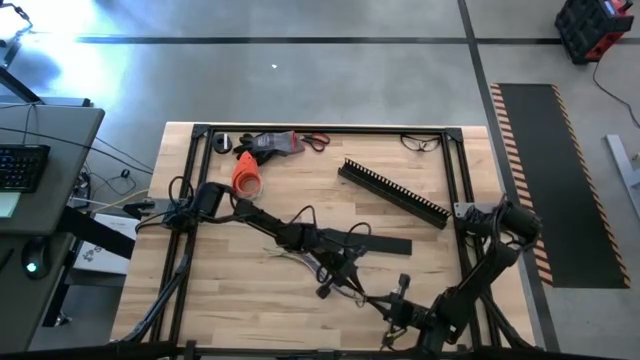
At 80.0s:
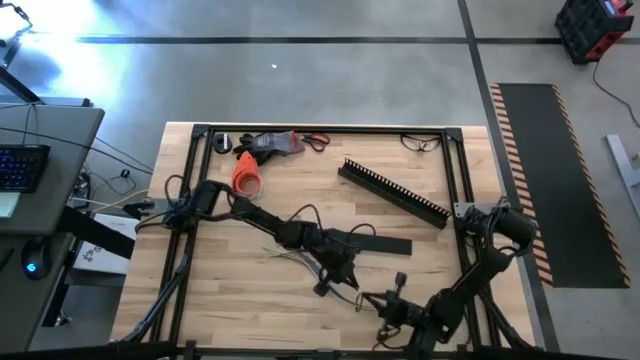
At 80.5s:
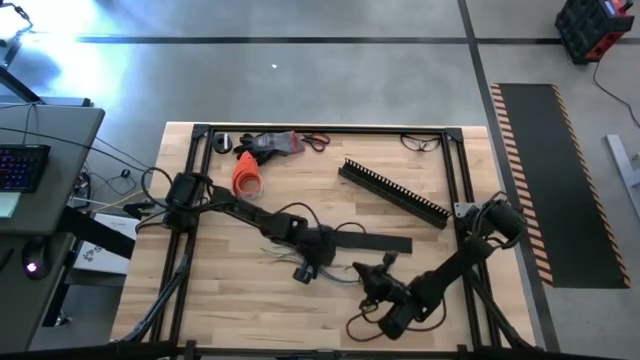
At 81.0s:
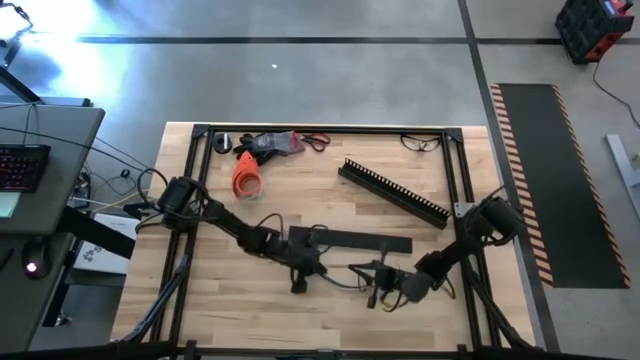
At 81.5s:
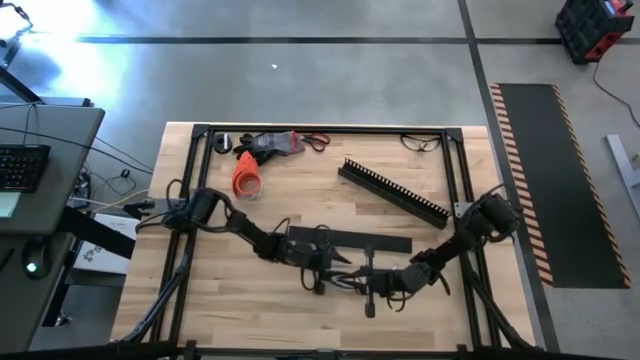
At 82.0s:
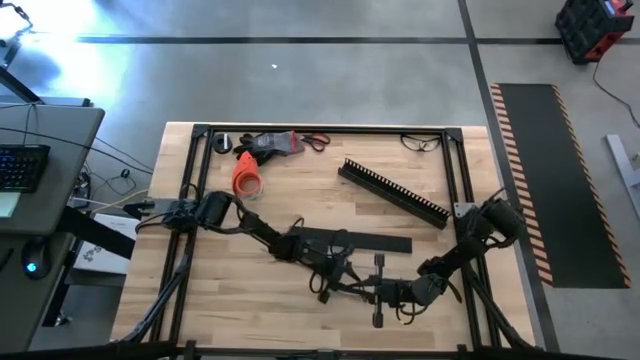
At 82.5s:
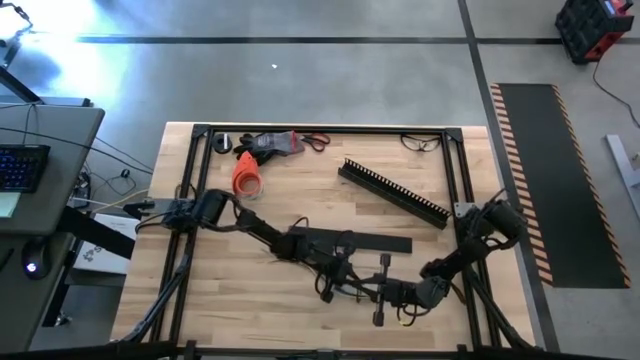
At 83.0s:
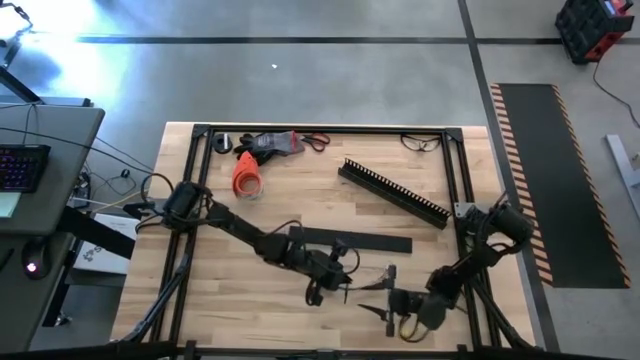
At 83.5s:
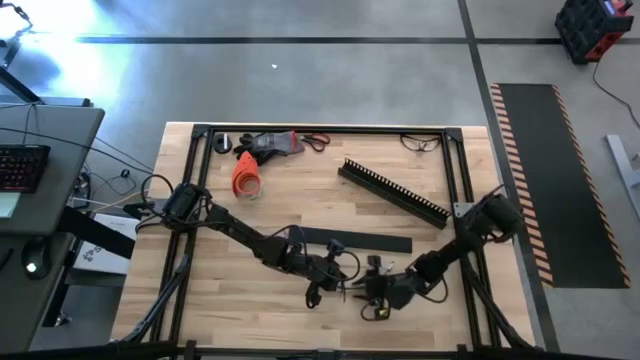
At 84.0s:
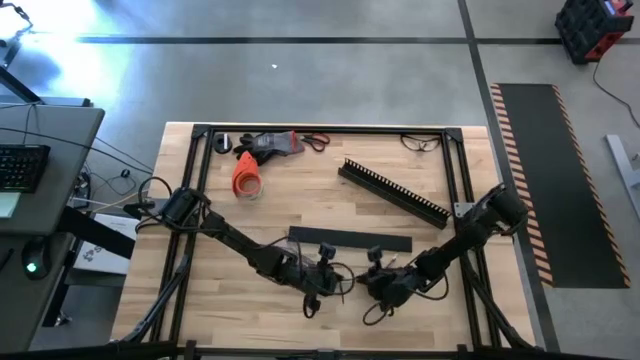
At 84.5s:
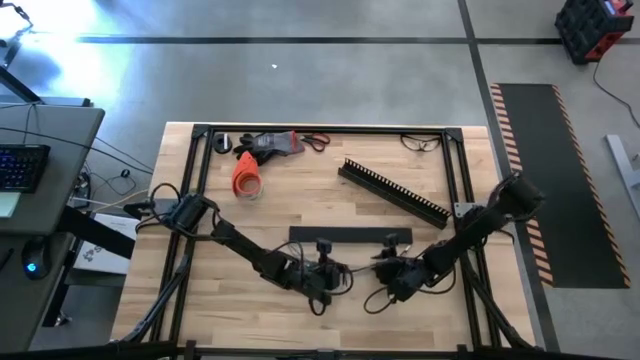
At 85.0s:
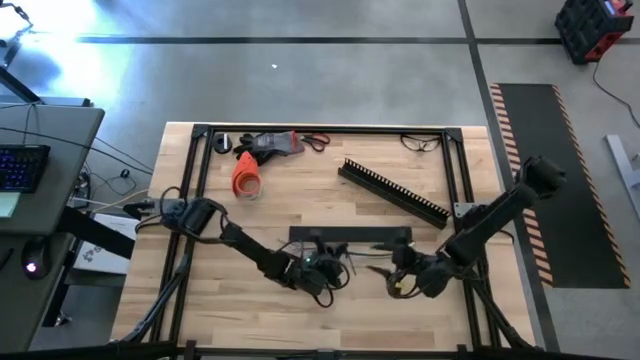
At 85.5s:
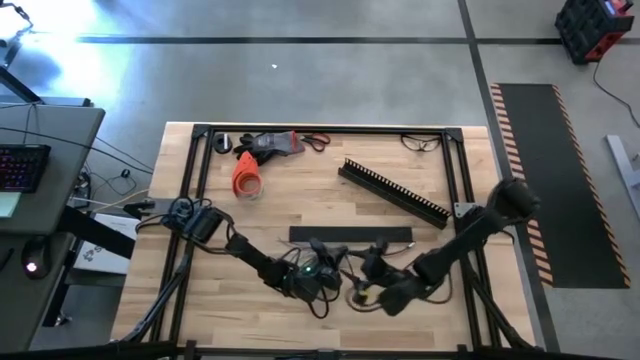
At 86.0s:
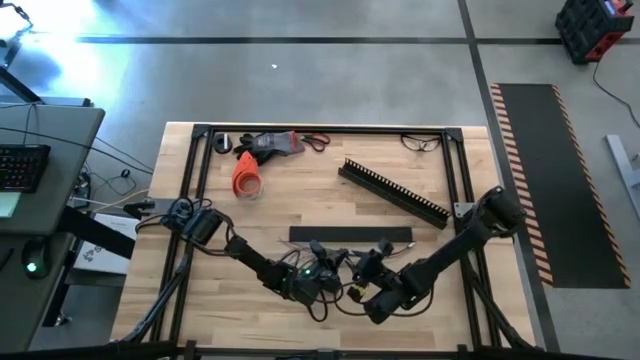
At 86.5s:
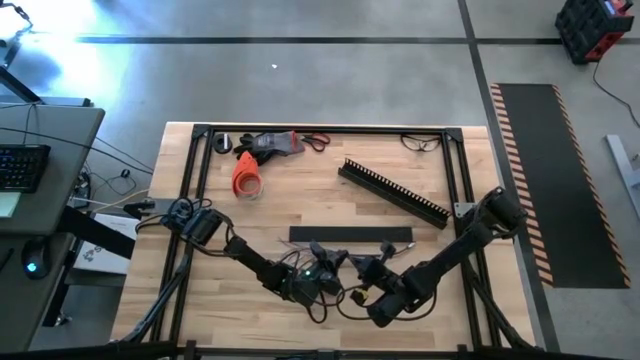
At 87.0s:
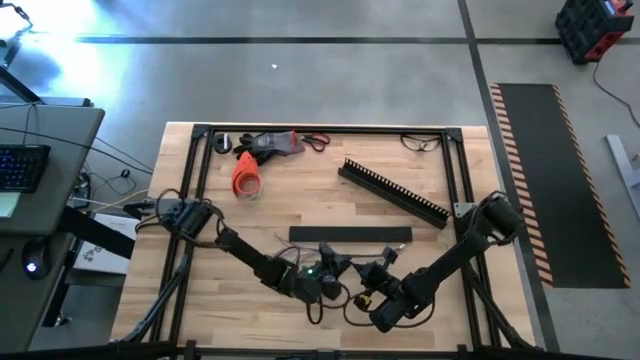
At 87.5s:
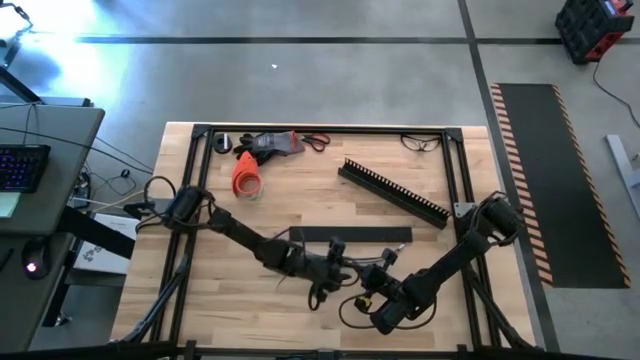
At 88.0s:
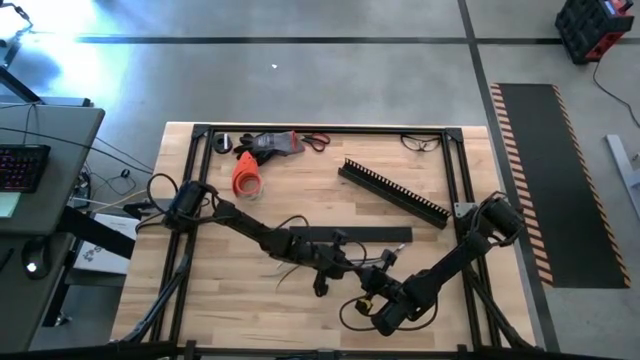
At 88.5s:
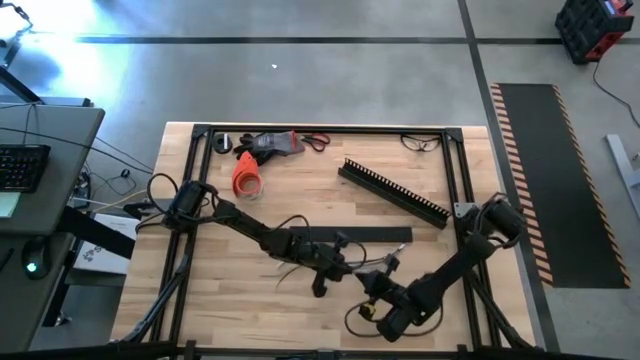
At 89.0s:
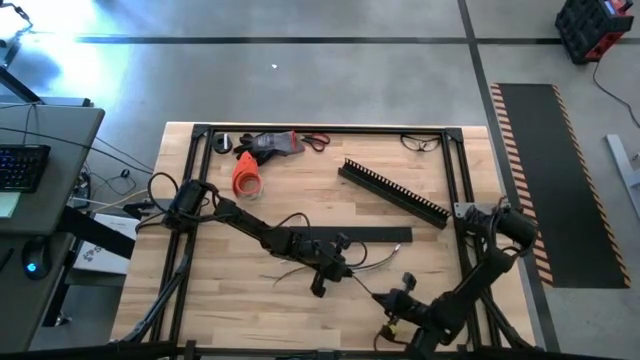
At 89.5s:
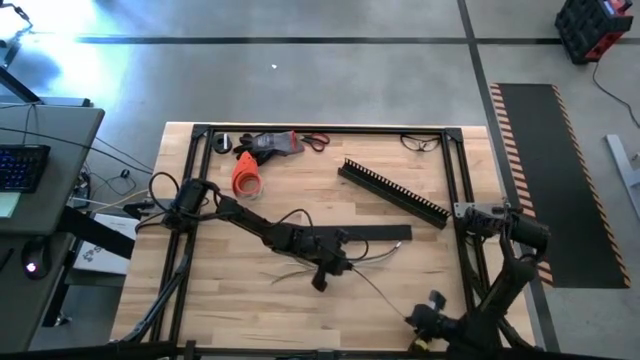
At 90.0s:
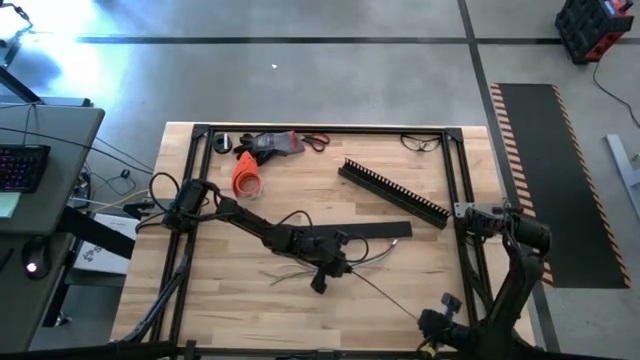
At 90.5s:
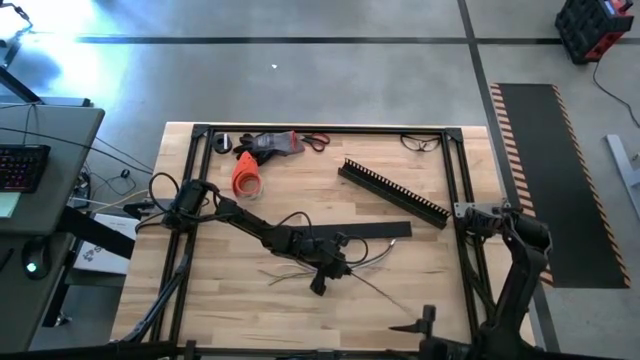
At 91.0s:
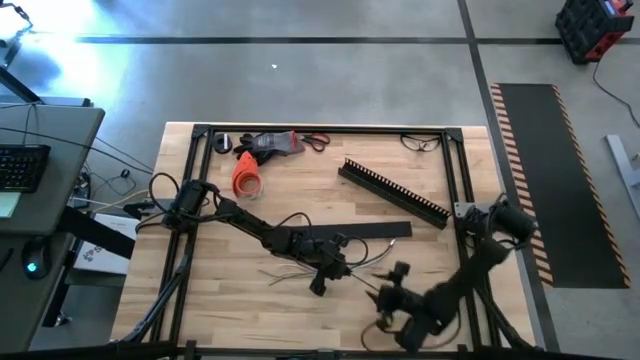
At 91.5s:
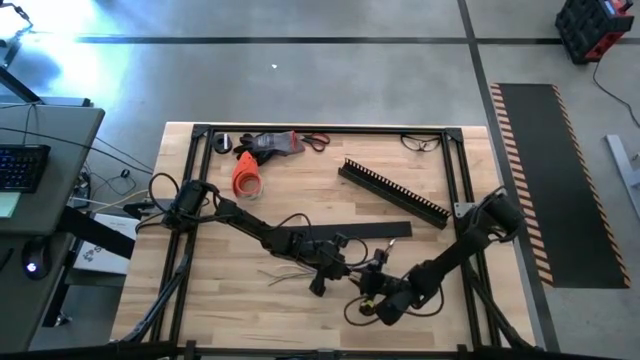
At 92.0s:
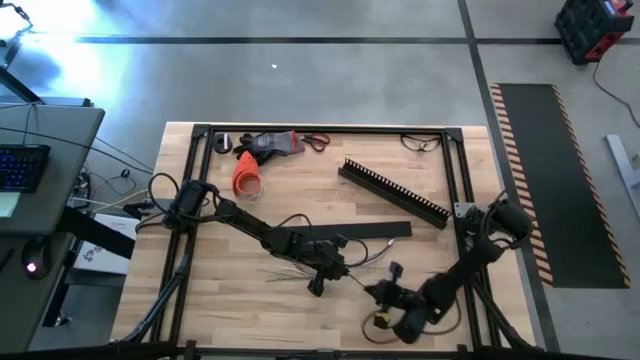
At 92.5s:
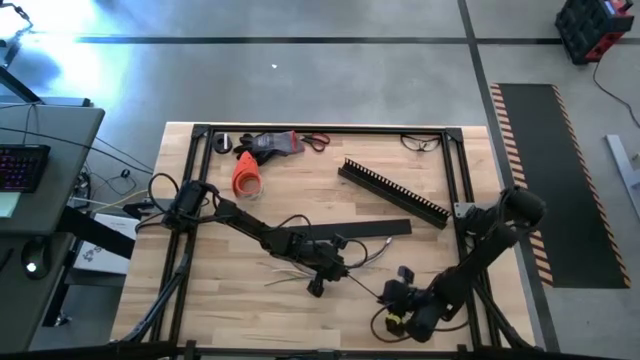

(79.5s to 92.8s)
Task: Ziptie cables
Wrap the colored cables with the black zip tie

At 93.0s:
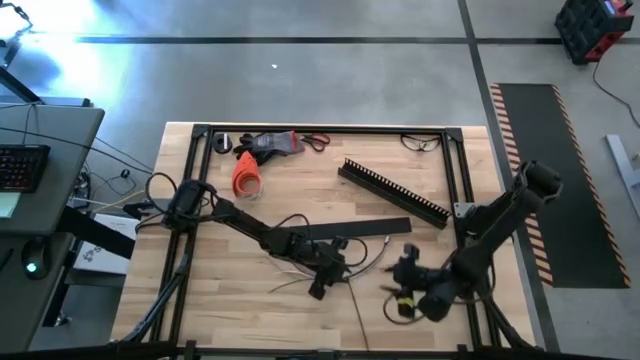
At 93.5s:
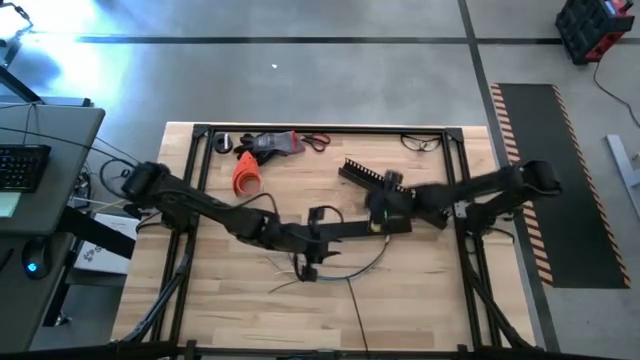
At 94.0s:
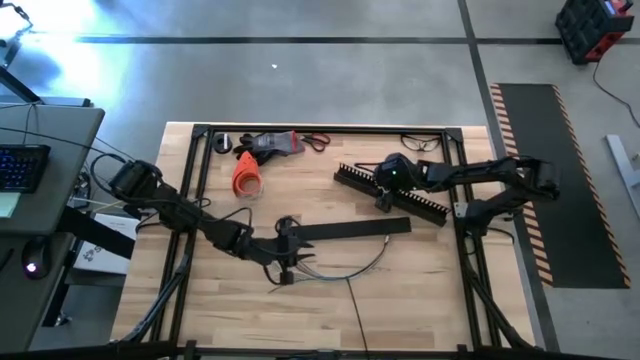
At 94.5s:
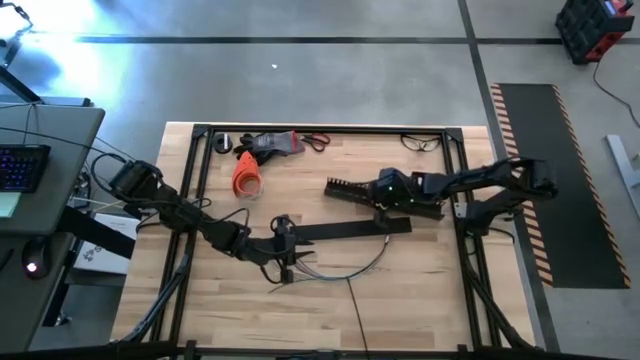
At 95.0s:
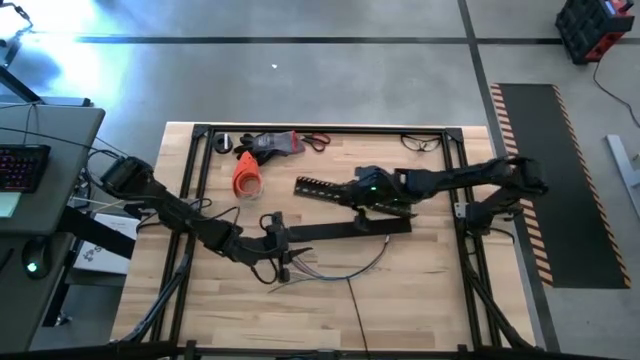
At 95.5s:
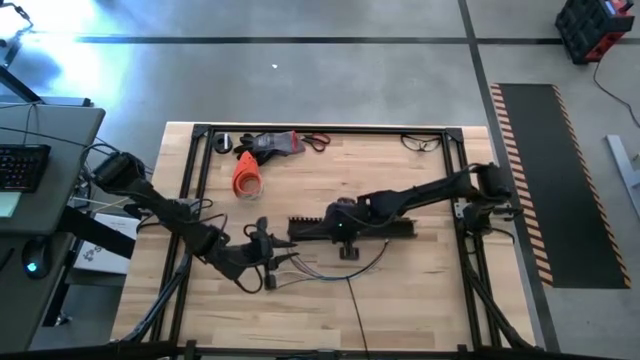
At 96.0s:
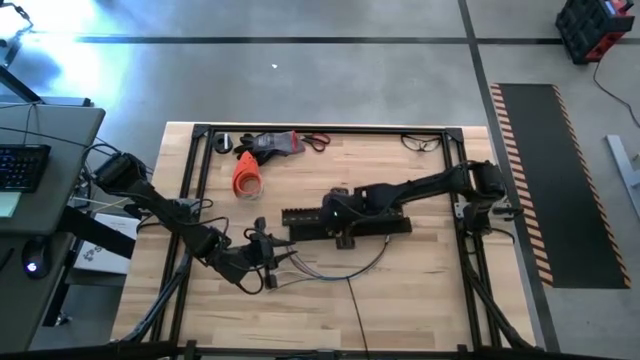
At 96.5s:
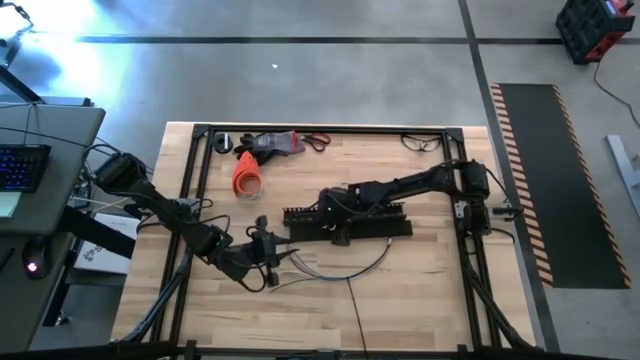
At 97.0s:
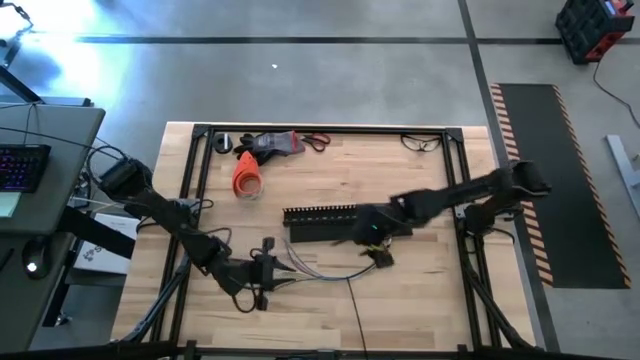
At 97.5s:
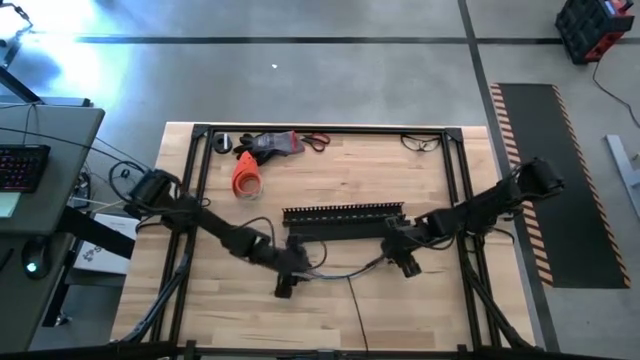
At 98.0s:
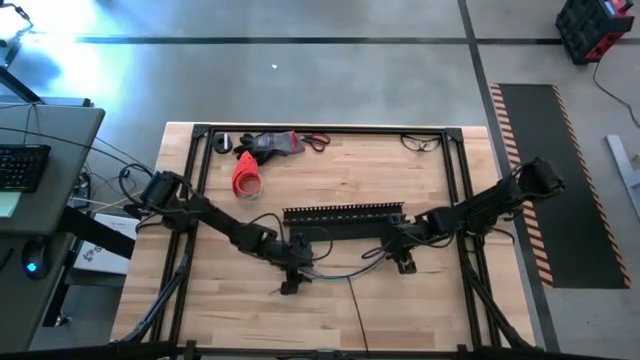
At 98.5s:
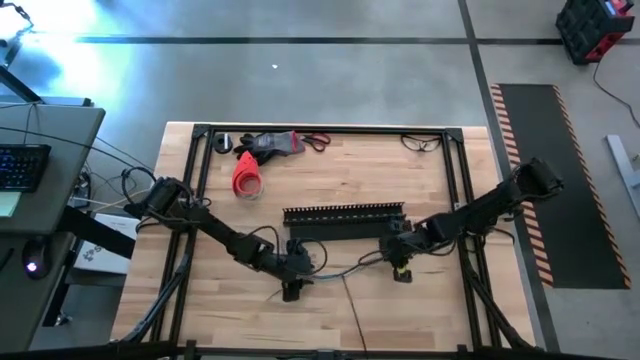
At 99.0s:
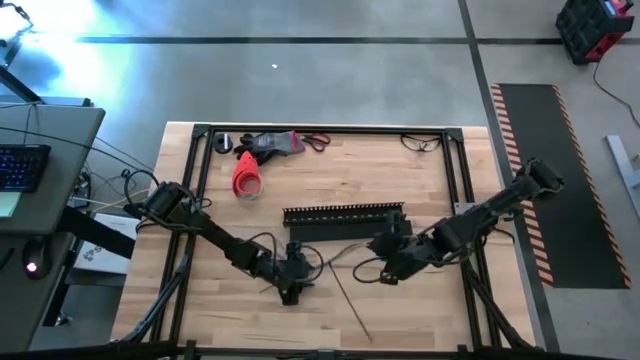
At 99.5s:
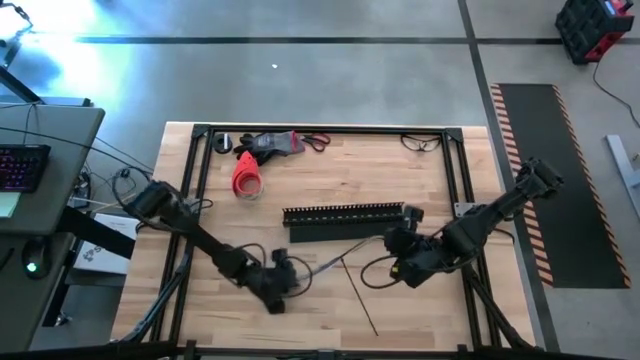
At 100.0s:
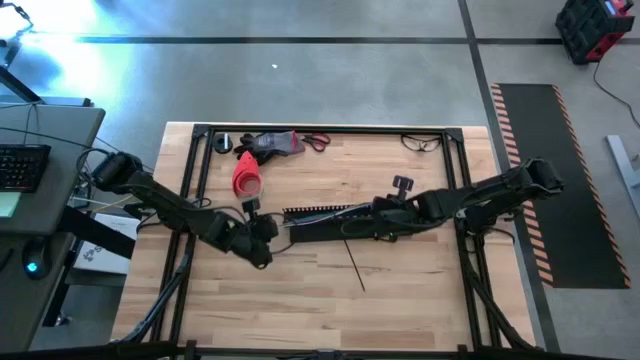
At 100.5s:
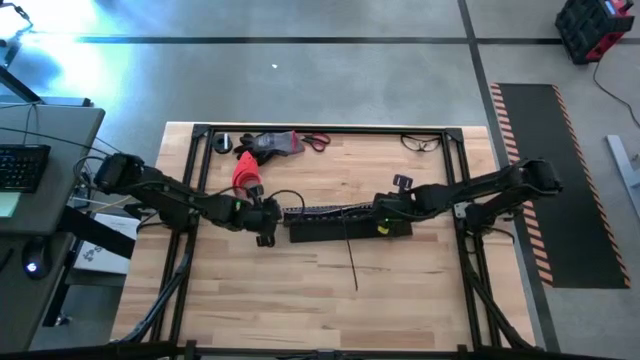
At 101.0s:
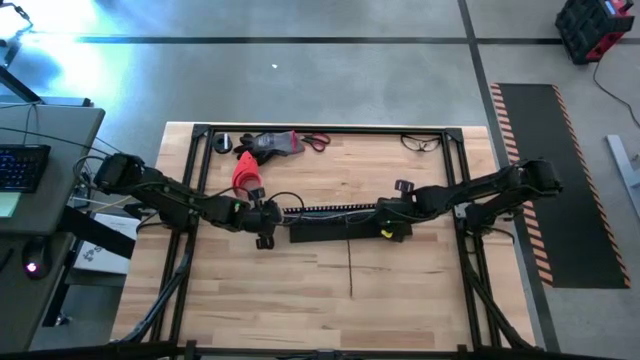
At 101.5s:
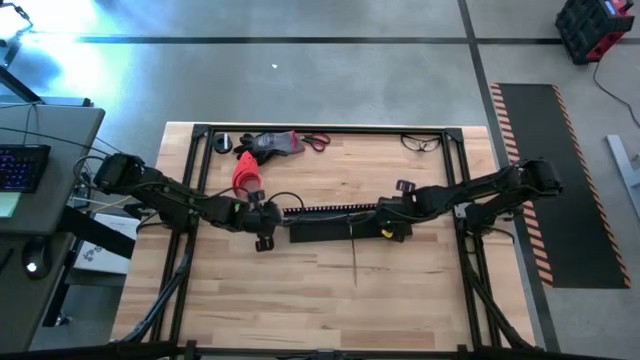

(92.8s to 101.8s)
Put colored ziptied cables into the black cable duct
